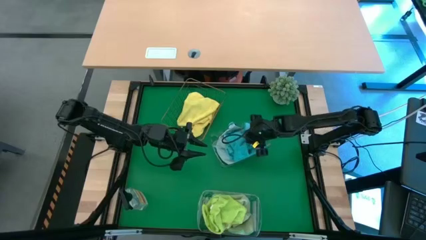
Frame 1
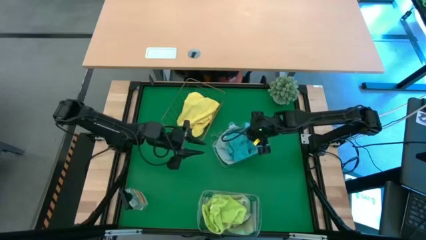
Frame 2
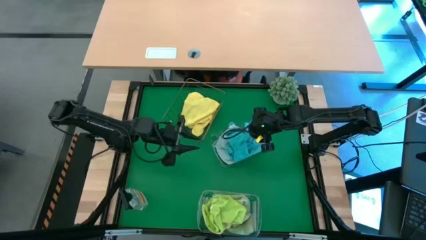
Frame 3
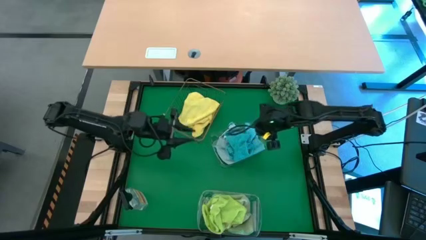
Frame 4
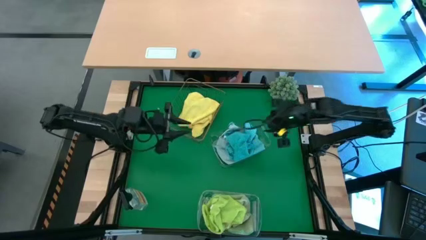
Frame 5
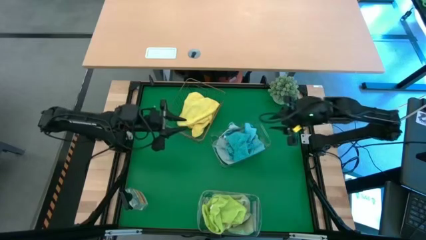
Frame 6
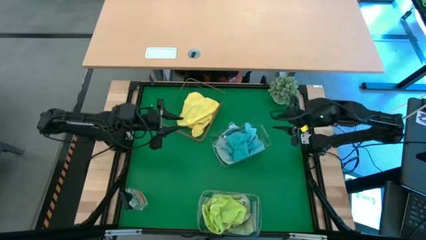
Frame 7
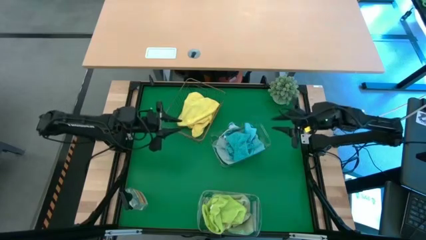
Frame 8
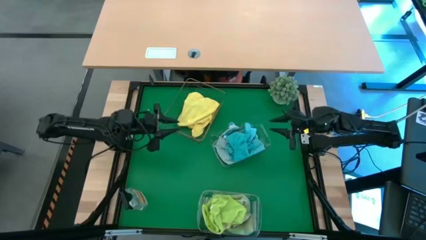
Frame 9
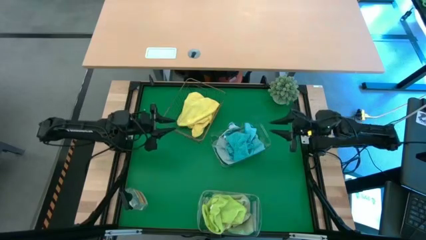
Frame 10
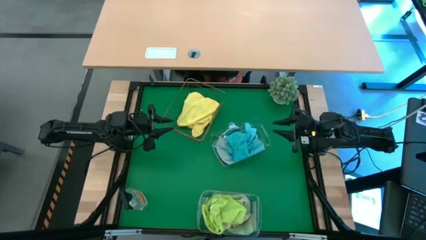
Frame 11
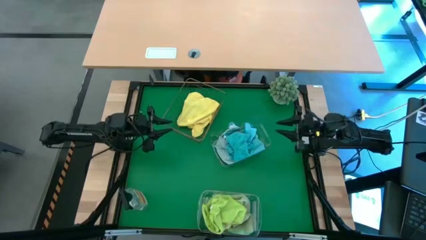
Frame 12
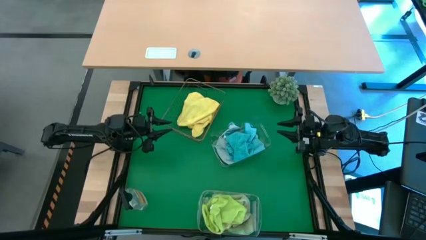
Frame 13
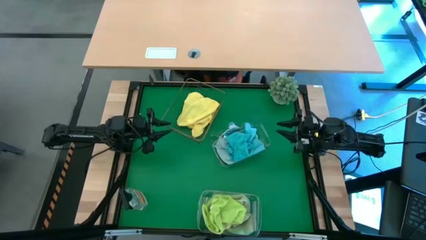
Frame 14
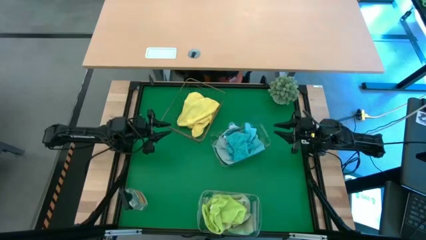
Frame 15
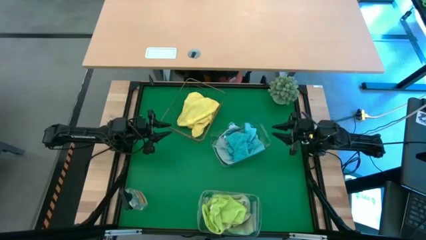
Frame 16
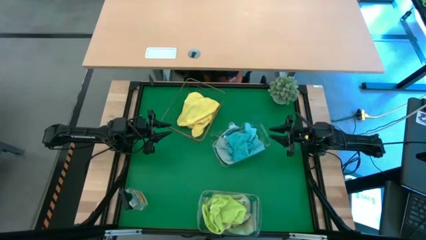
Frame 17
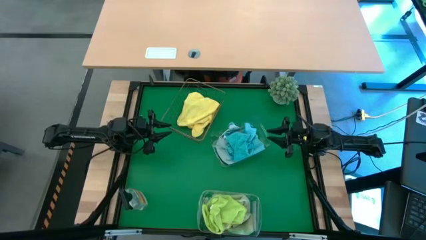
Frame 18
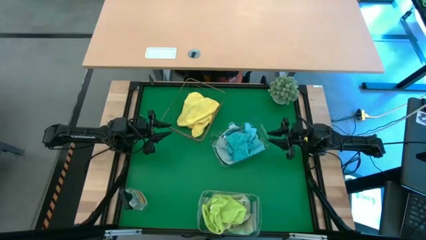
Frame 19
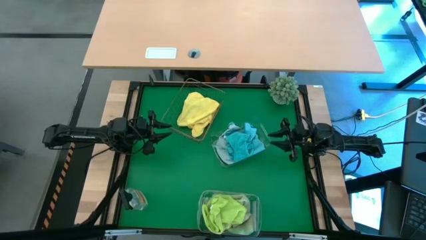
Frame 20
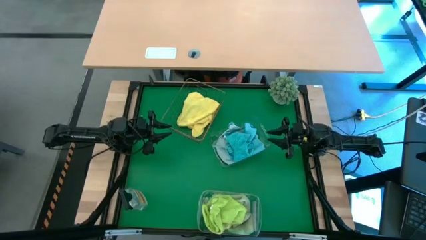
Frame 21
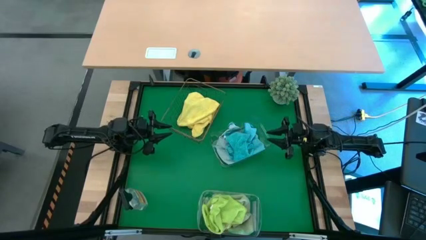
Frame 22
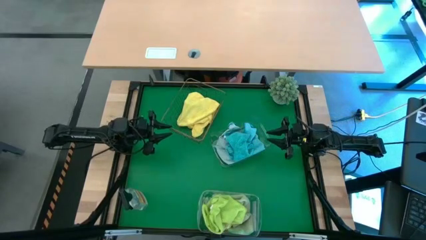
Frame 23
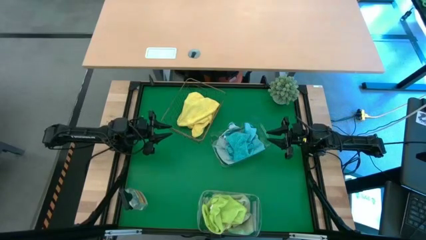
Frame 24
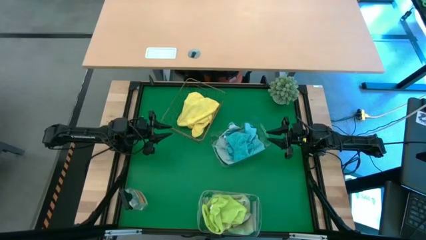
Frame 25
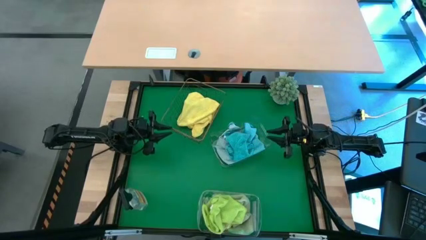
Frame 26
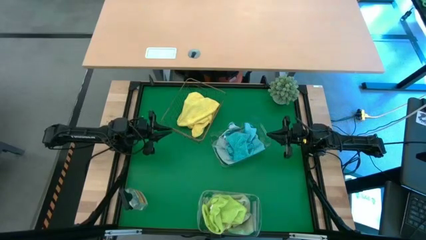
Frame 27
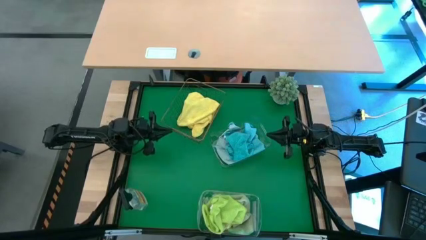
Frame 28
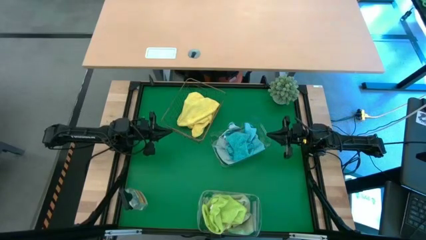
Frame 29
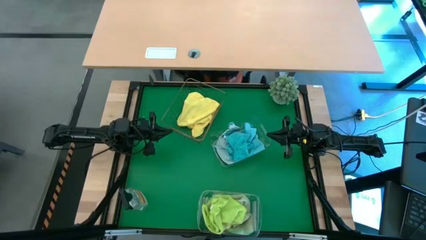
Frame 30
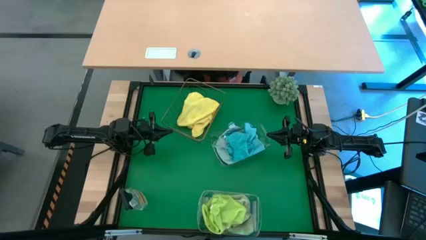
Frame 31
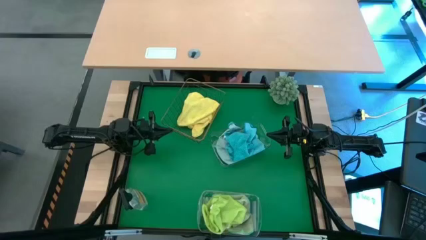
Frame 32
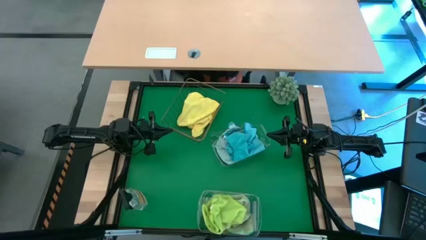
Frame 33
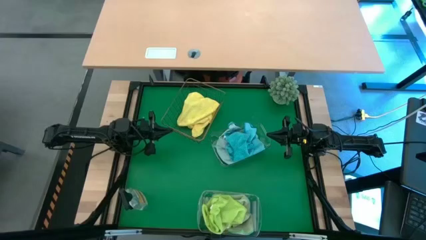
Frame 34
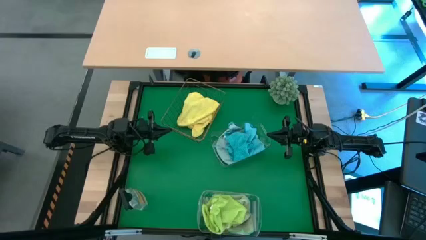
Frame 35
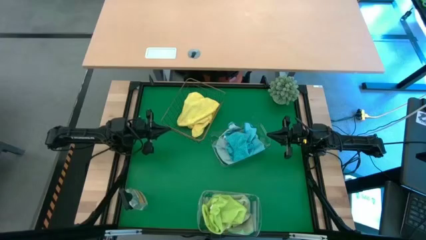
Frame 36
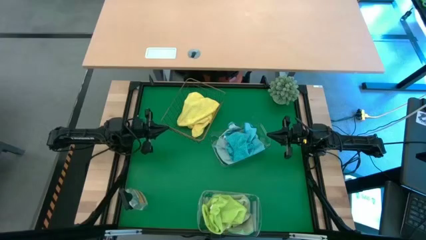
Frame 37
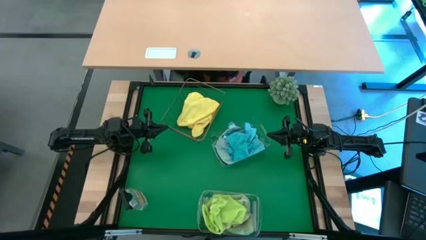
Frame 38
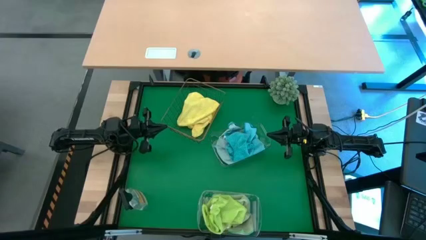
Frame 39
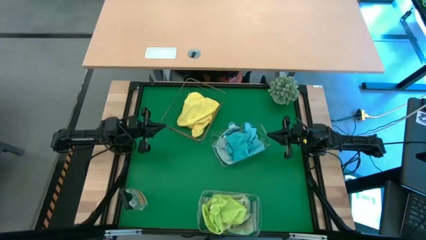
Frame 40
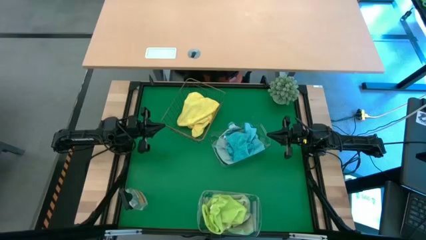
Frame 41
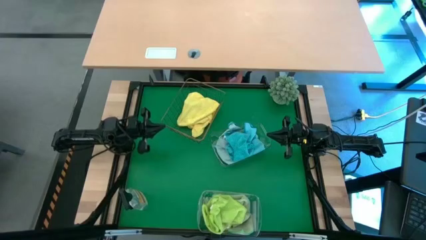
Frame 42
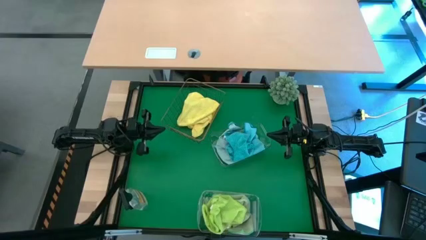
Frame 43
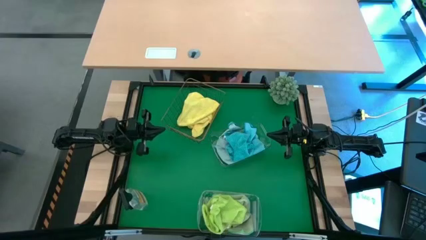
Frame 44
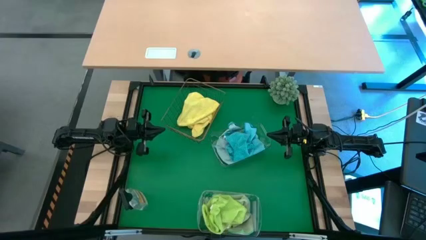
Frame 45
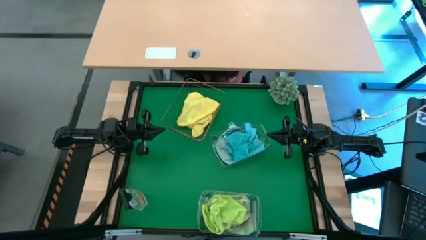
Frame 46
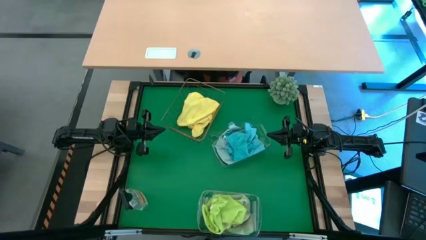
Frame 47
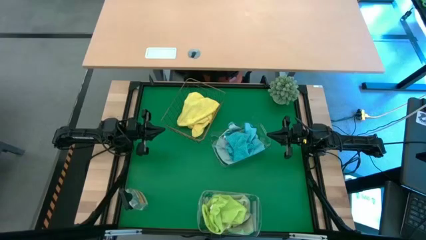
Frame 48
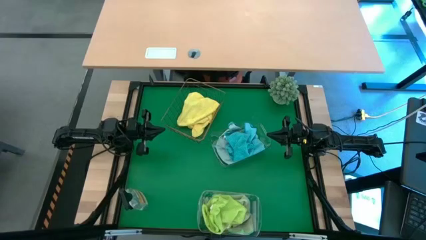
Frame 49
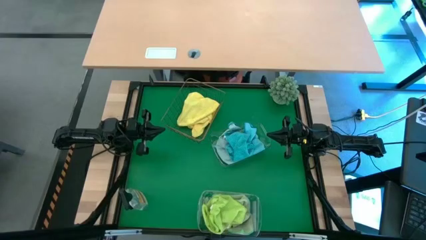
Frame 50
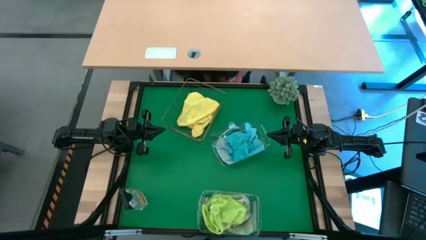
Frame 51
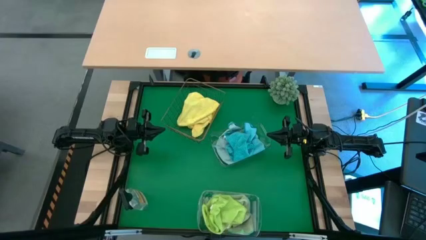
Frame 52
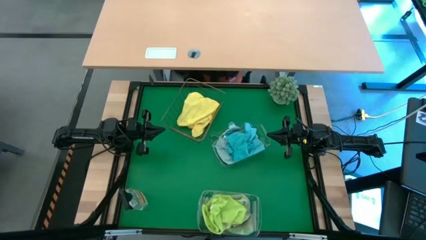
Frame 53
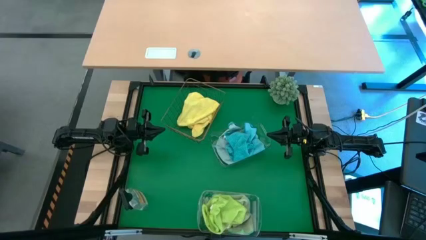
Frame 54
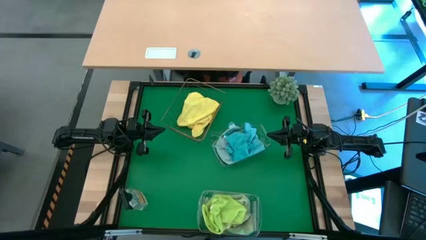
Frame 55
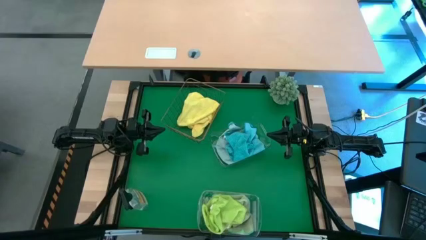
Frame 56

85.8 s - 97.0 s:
Task: Sort microfiber towel by color & place in baskets
Return to Home Position
